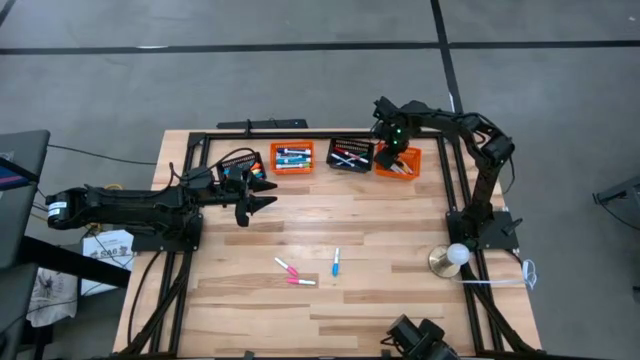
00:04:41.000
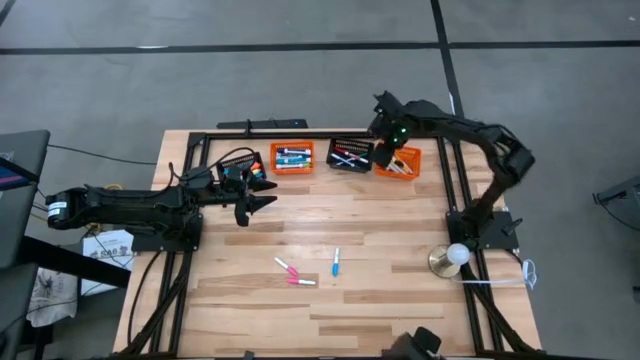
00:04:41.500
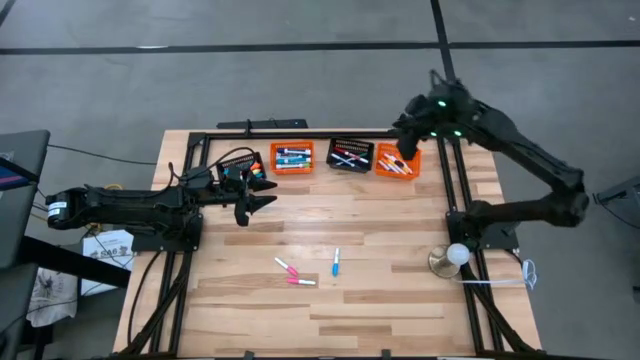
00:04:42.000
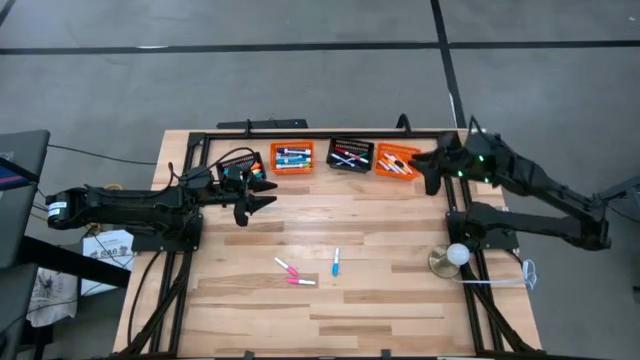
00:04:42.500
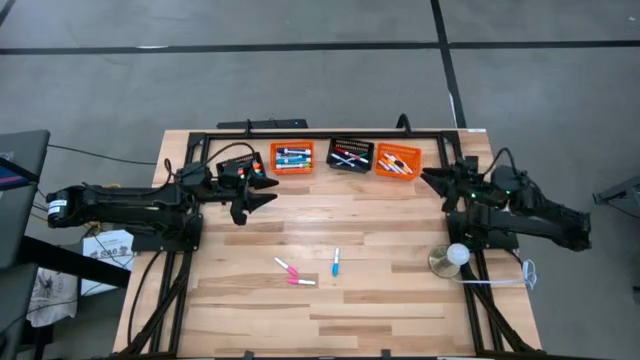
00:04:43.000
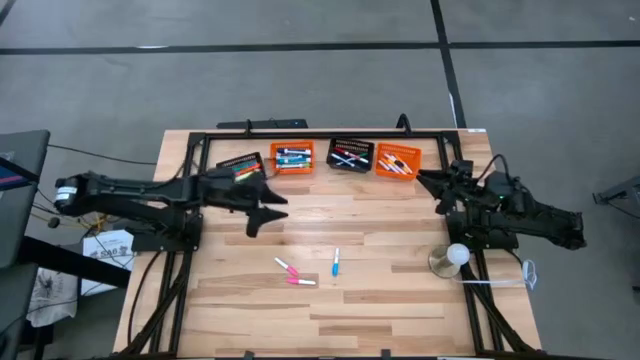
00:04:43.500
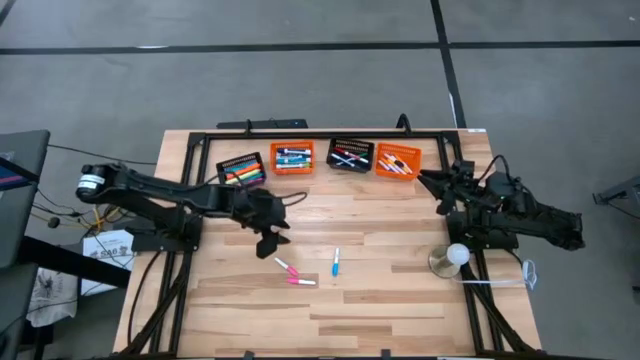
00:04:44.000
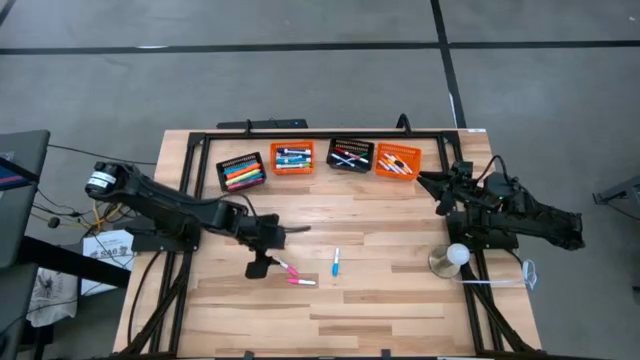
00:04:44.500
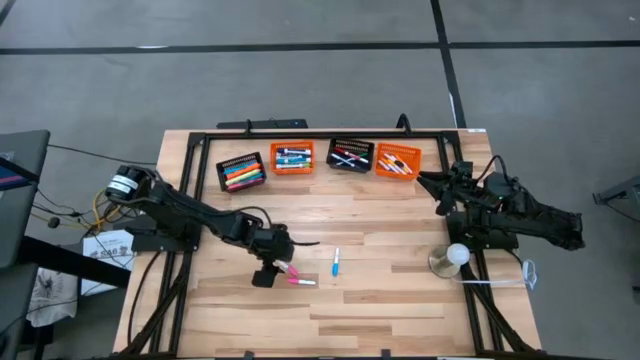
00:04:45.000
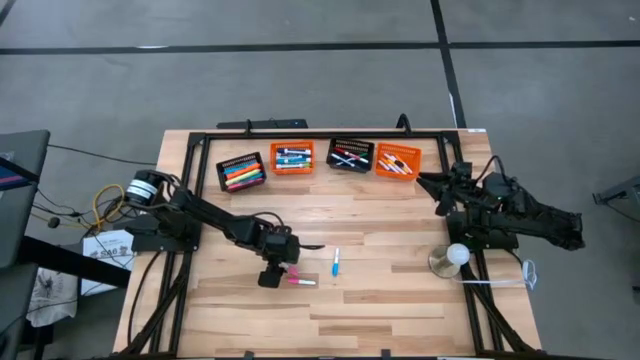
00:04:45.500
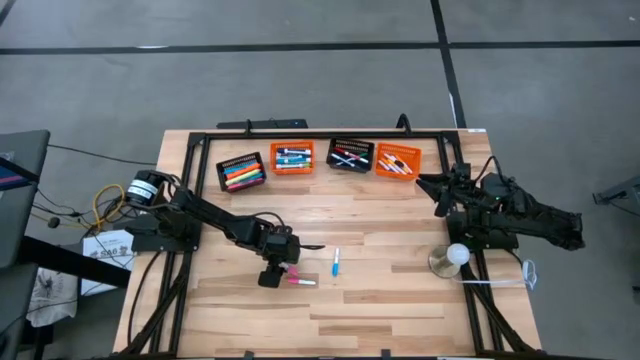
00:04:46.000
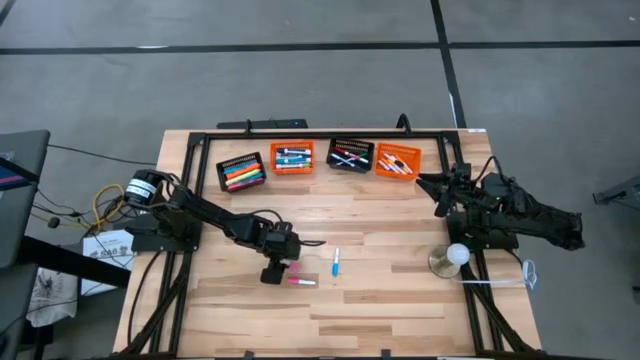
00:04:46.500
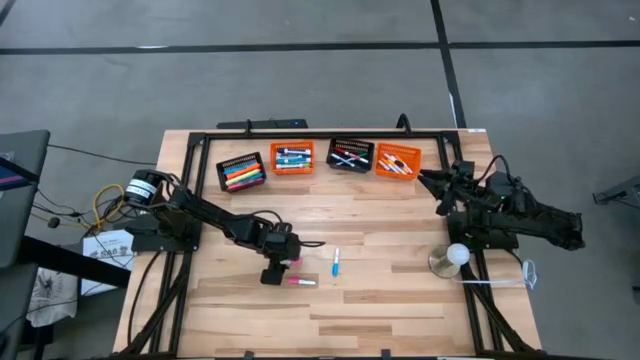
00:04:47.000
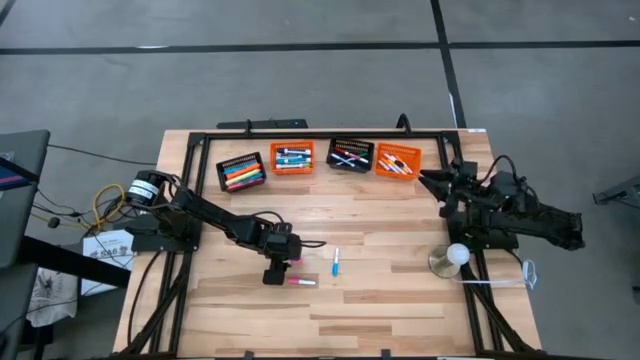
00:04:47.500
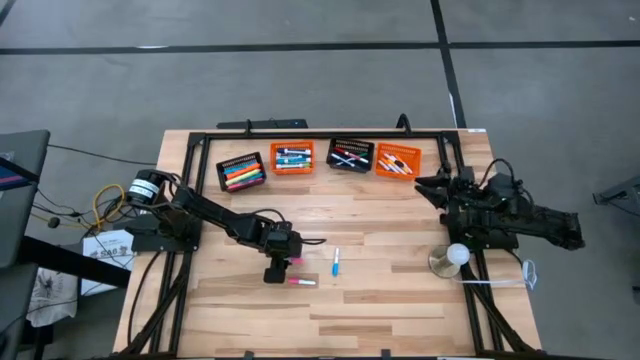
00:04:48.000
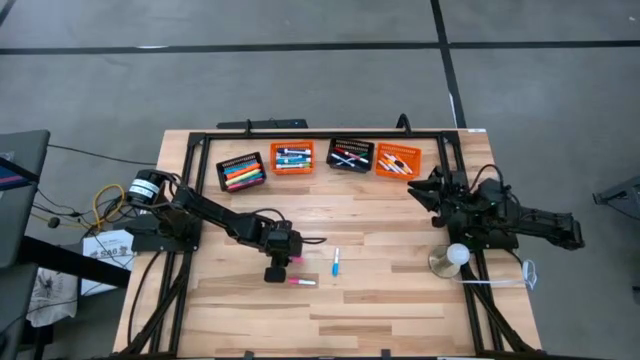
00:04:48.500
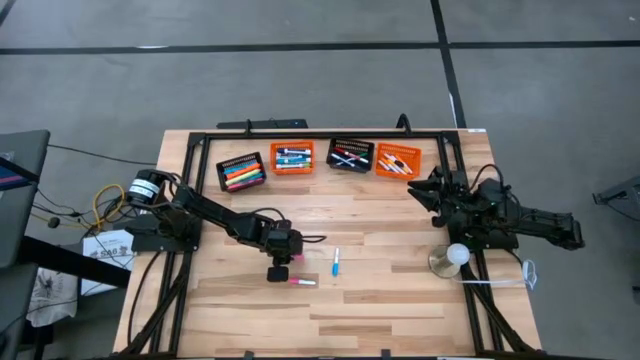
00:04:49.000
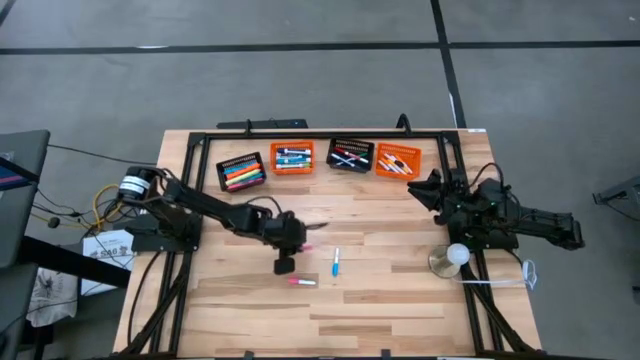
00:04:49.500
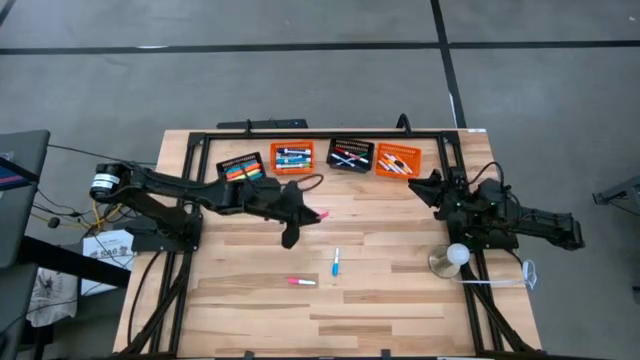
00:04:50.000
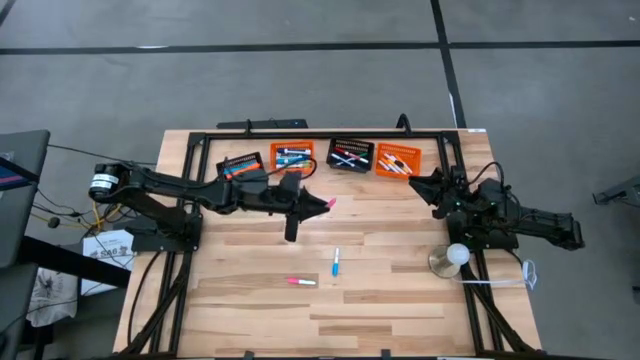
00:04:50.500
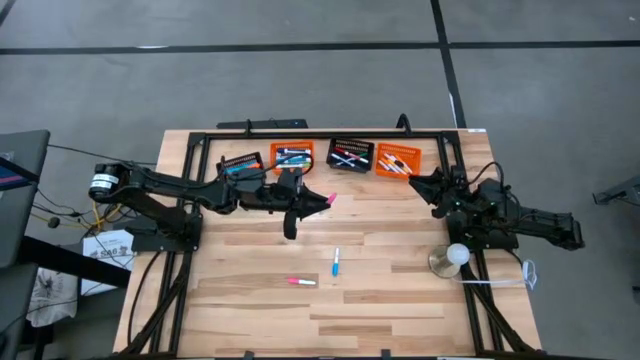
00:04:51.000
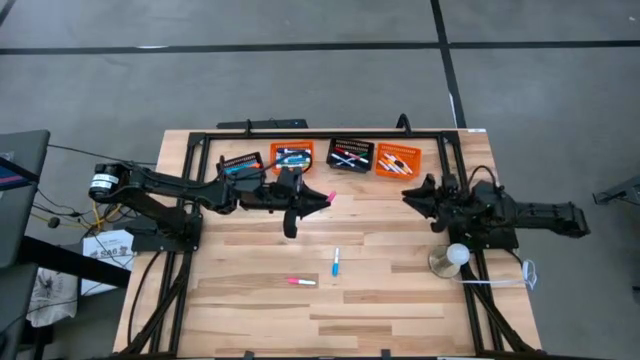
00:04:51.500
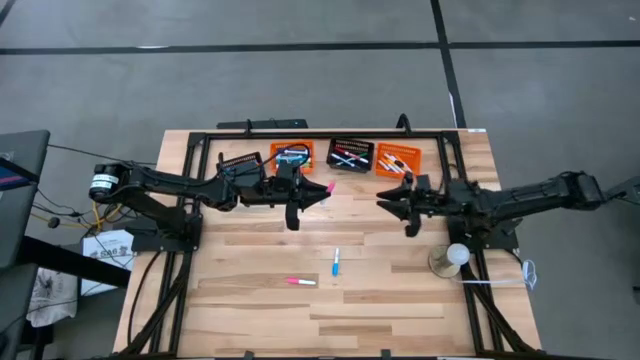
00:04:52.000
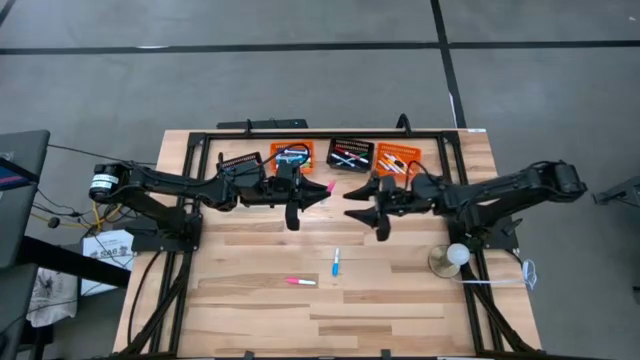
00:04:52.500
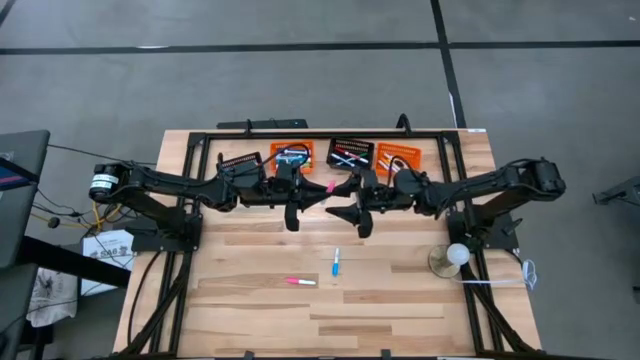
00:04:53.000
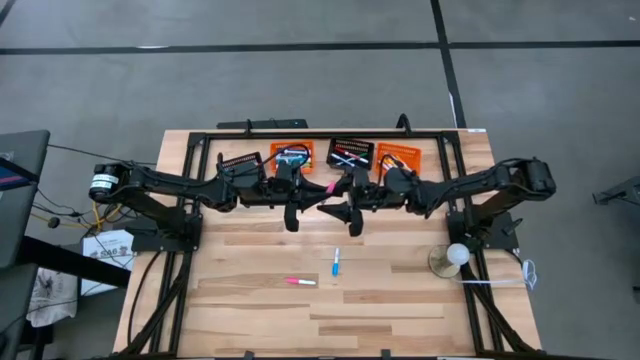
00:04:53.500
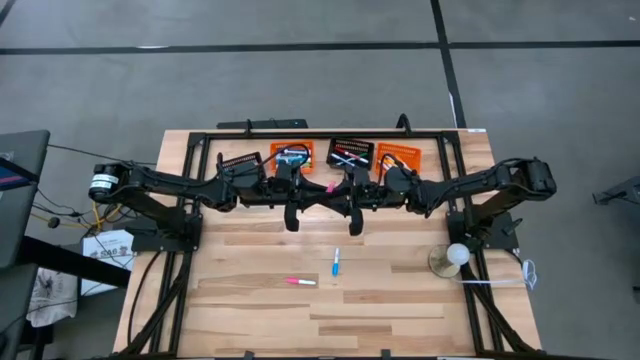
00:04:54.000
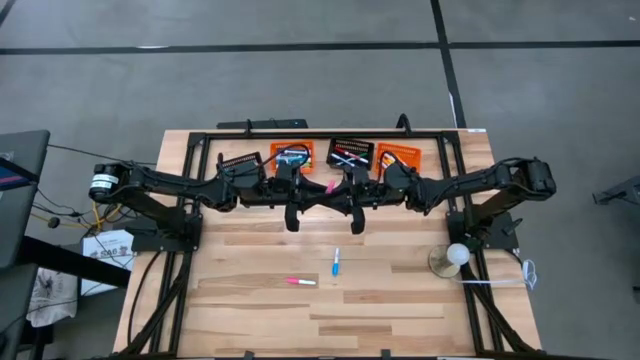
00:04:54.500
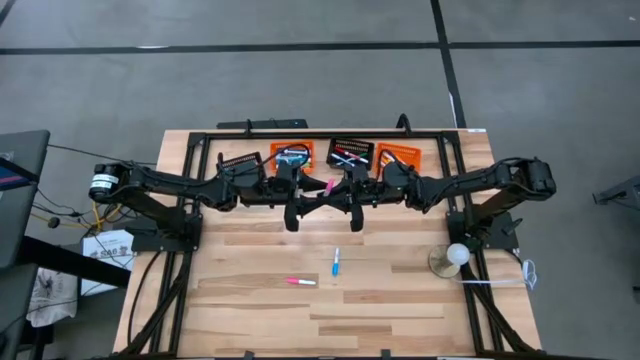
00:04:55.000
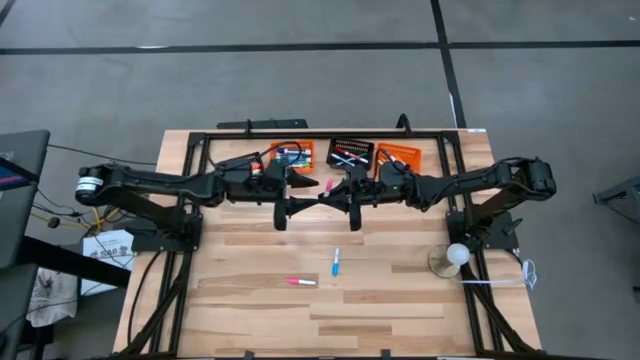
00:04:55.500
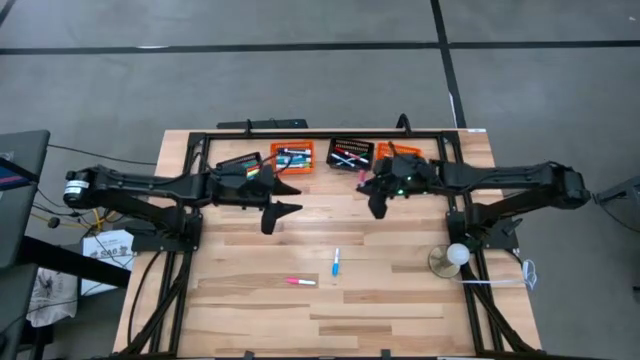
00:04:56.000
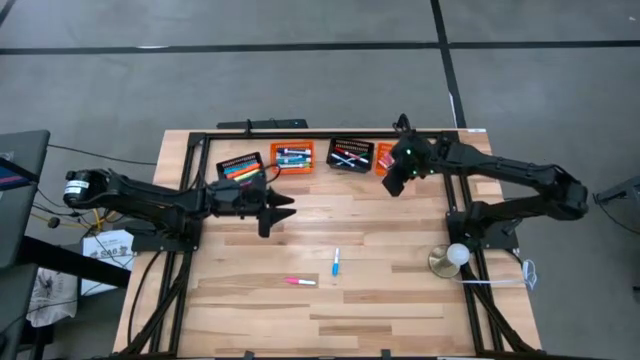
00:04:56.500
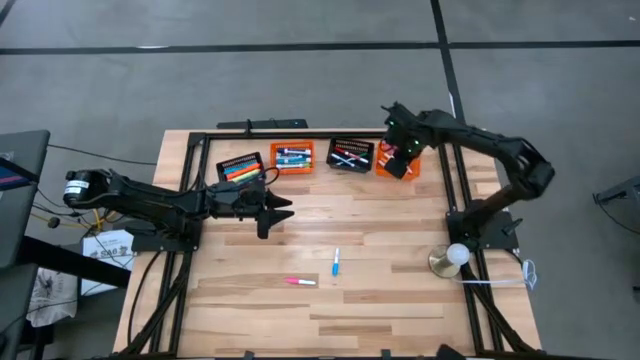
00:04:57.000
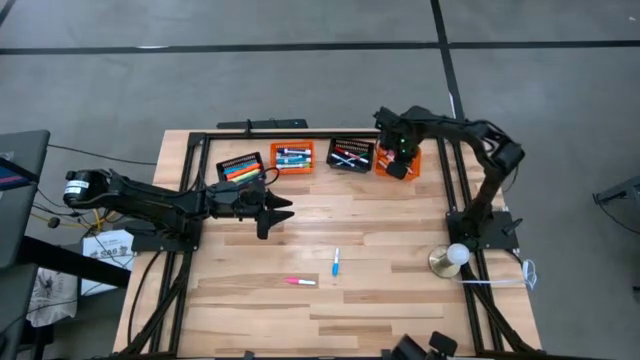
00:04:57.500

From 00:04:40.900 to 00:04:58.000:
Task: Pick & Place Markers
Put the small pink highlighter pen into the right orange bin

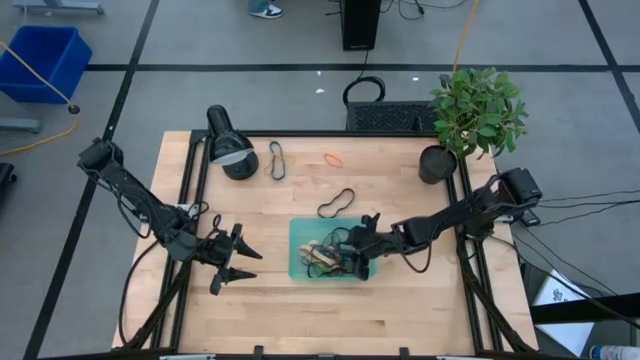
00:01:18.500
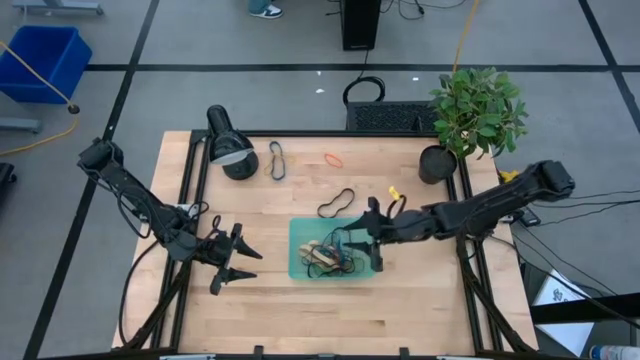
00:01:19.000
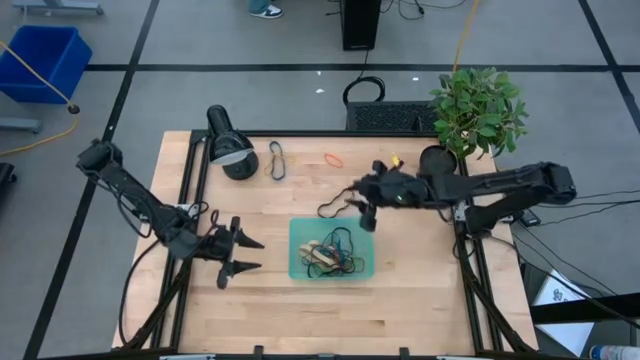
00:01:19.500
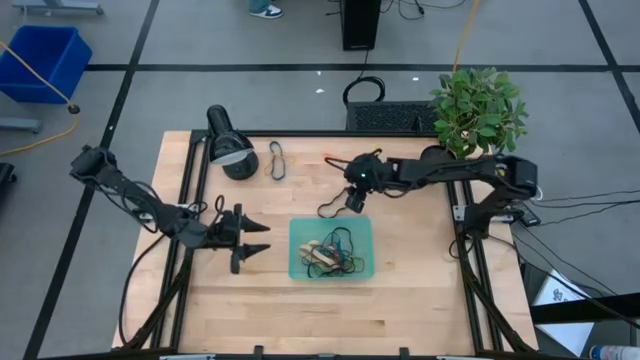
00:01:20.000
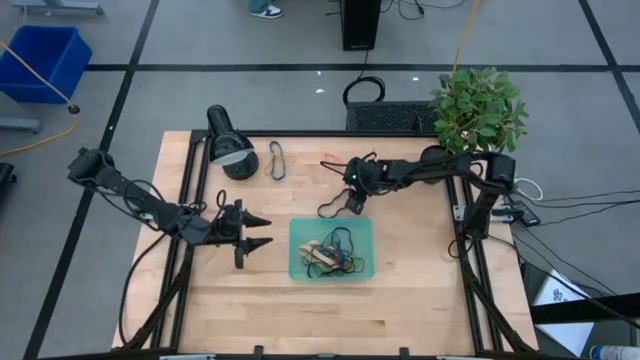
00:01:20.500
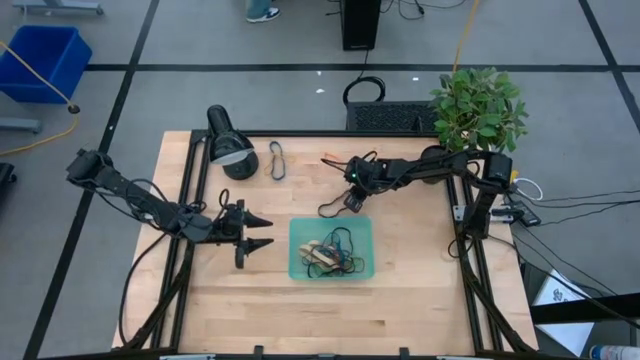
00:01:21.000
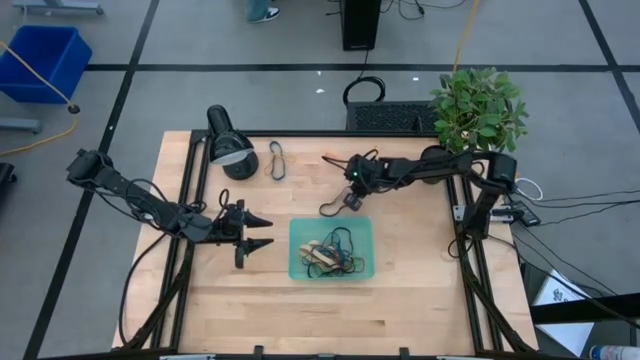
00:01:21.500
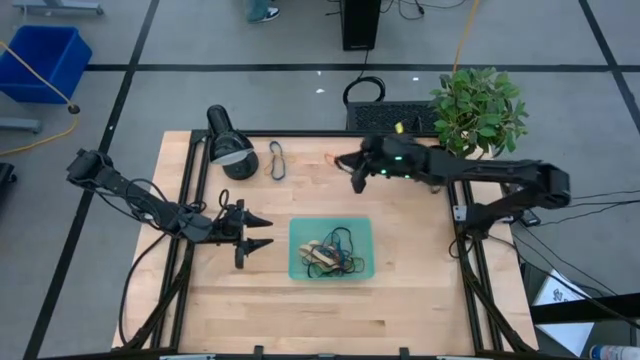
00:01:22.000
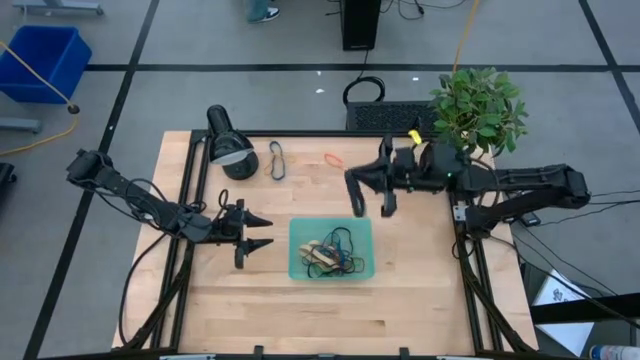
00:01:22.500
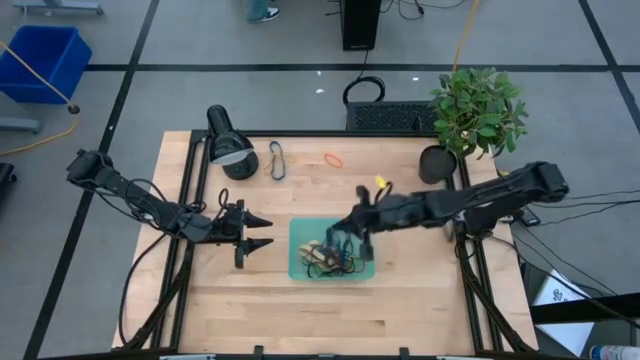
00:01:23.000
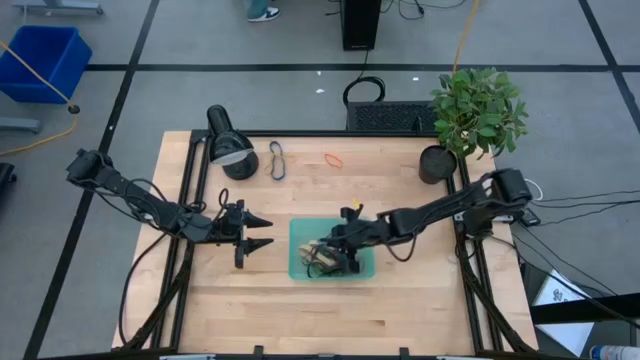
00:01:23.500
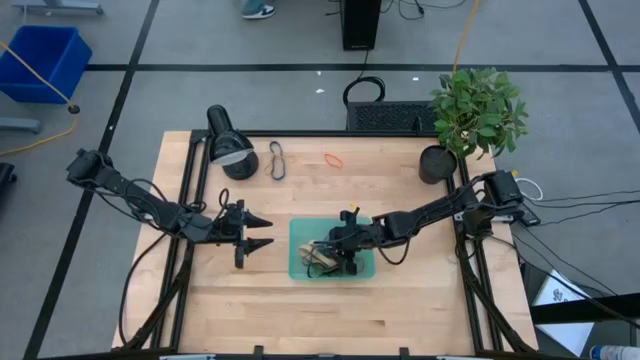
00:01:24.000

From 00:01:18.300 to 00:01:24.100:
Task: Pick and place rubber bands into bin
Put the black rubber band into the green bin
